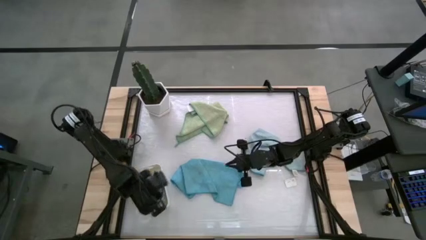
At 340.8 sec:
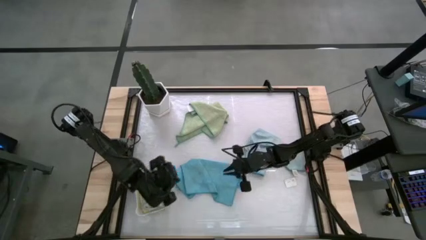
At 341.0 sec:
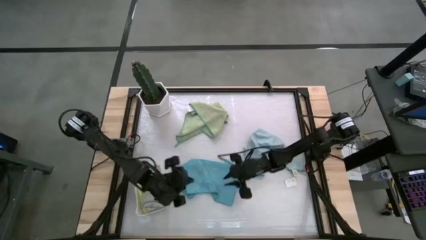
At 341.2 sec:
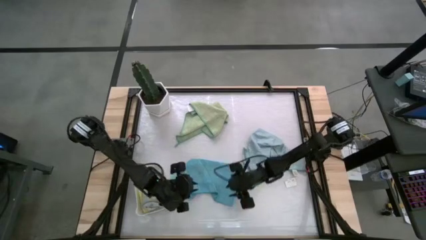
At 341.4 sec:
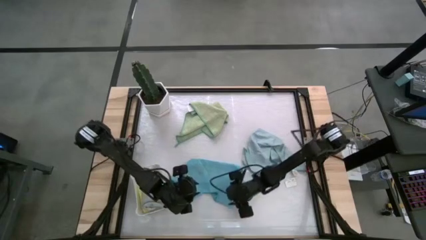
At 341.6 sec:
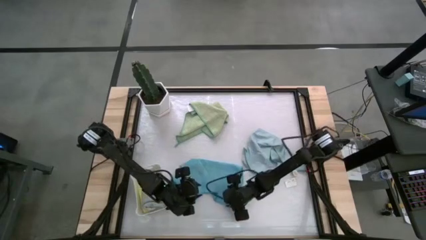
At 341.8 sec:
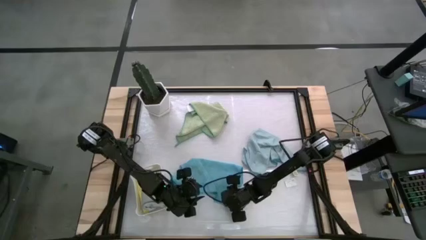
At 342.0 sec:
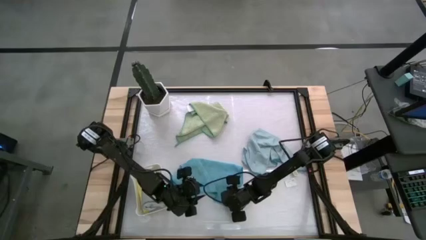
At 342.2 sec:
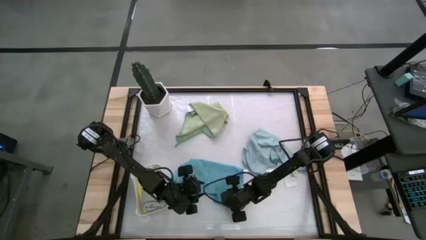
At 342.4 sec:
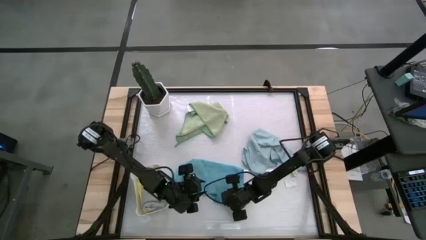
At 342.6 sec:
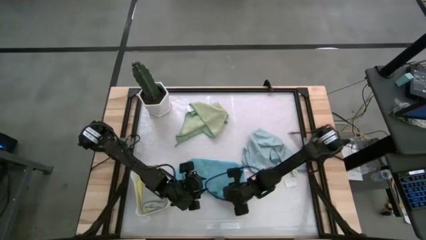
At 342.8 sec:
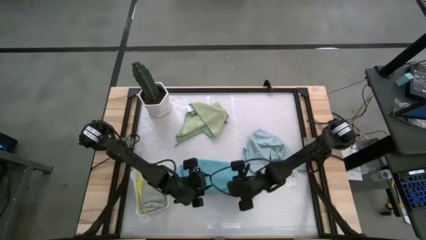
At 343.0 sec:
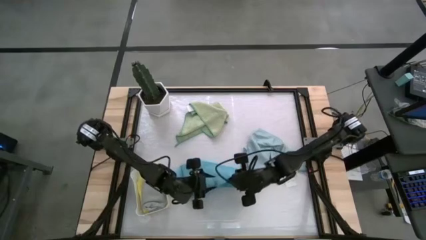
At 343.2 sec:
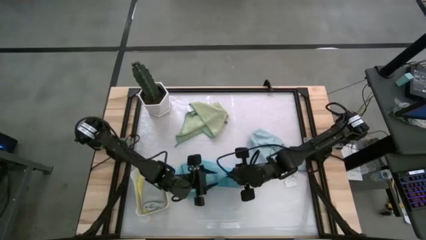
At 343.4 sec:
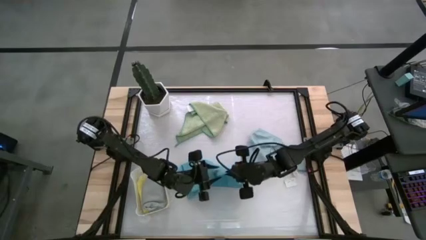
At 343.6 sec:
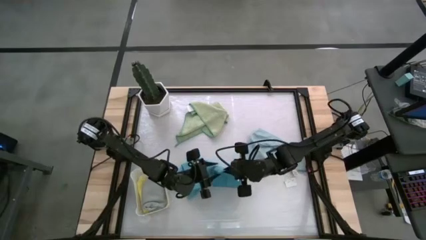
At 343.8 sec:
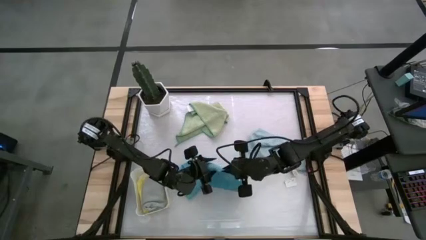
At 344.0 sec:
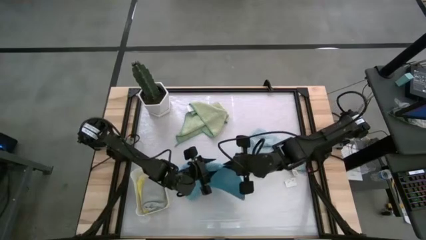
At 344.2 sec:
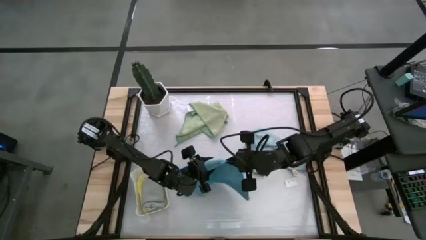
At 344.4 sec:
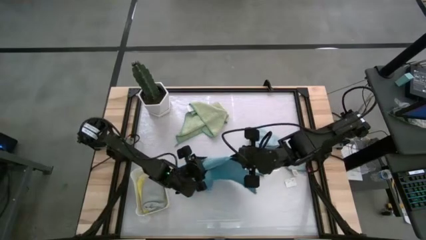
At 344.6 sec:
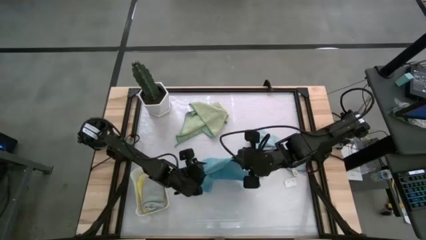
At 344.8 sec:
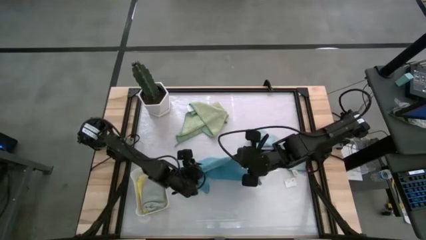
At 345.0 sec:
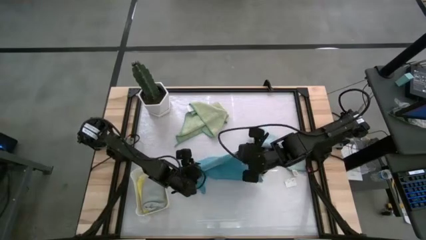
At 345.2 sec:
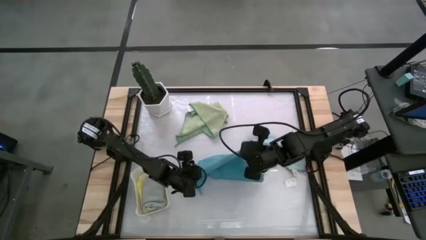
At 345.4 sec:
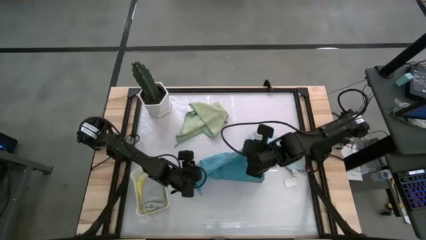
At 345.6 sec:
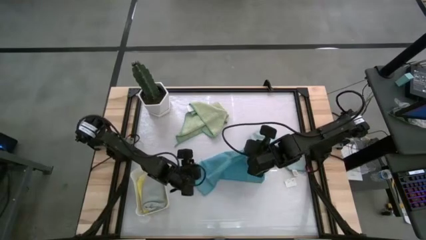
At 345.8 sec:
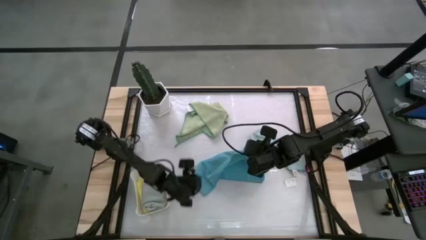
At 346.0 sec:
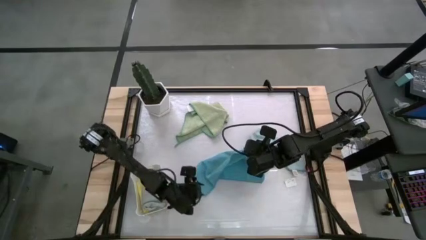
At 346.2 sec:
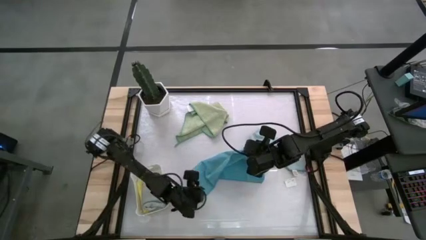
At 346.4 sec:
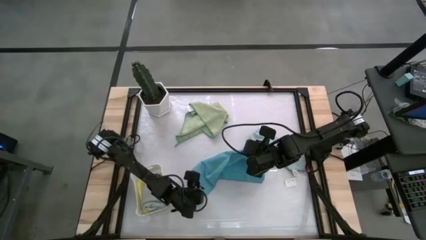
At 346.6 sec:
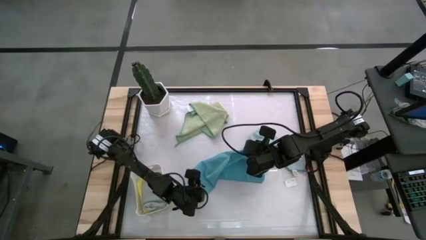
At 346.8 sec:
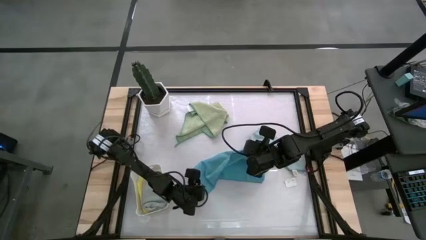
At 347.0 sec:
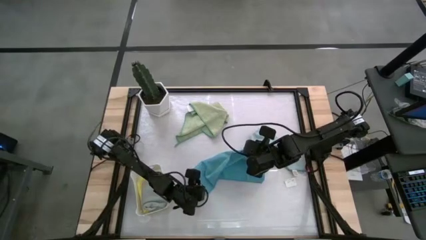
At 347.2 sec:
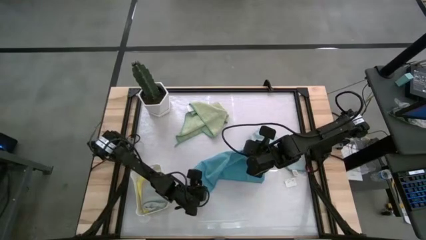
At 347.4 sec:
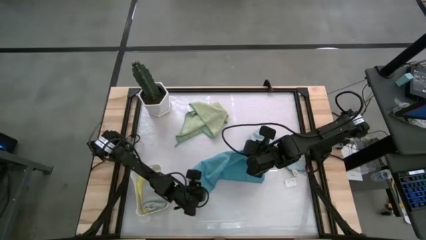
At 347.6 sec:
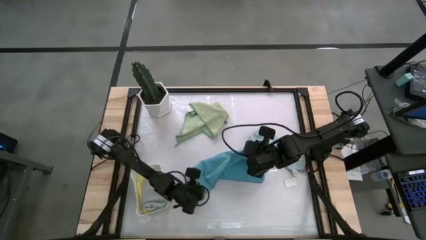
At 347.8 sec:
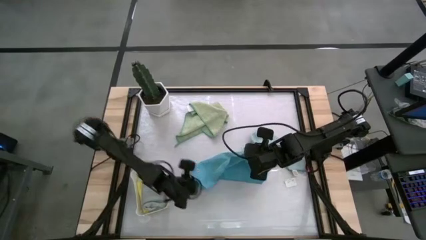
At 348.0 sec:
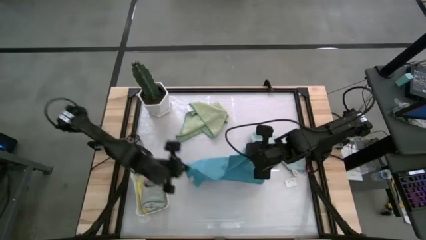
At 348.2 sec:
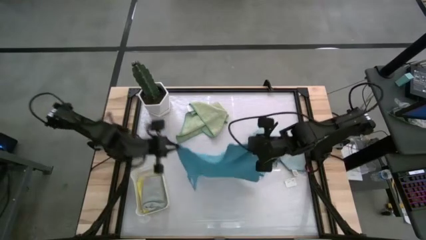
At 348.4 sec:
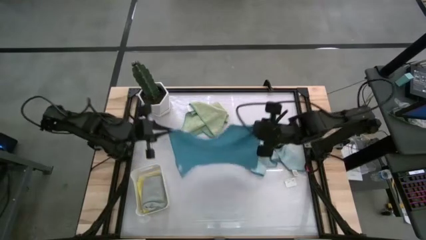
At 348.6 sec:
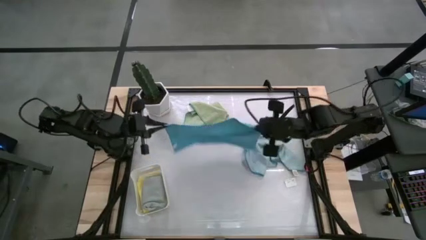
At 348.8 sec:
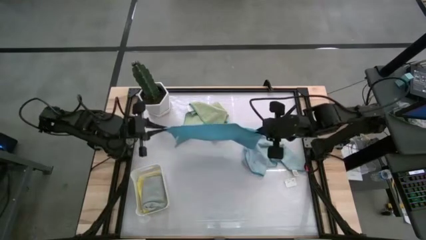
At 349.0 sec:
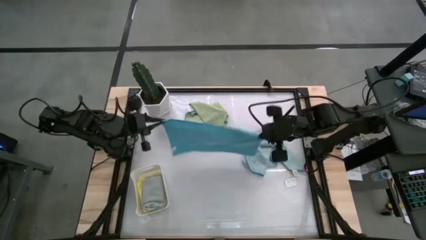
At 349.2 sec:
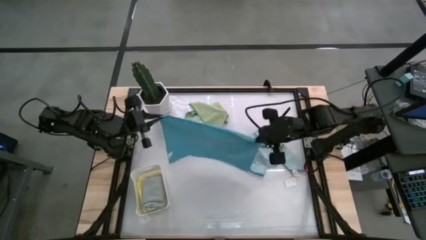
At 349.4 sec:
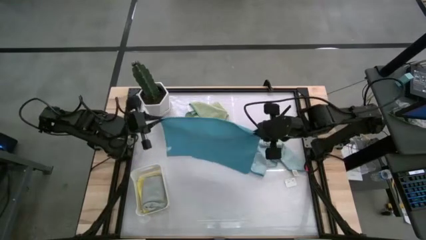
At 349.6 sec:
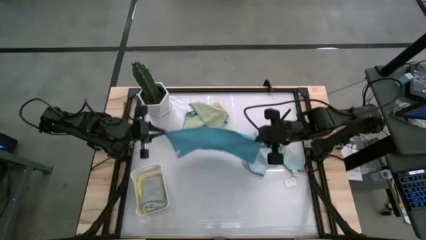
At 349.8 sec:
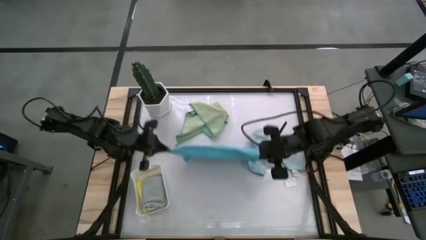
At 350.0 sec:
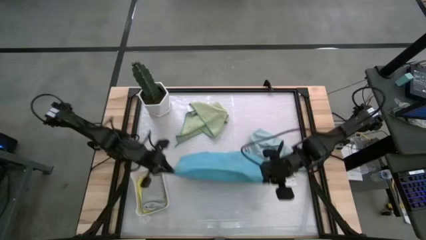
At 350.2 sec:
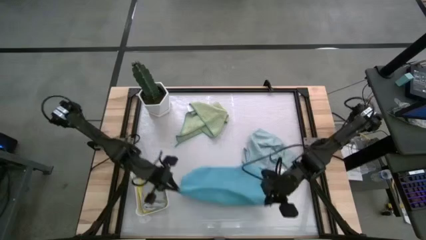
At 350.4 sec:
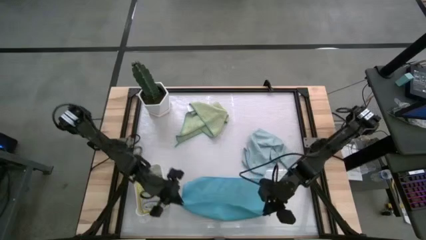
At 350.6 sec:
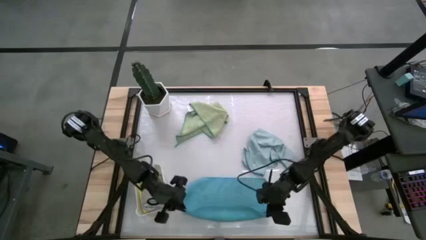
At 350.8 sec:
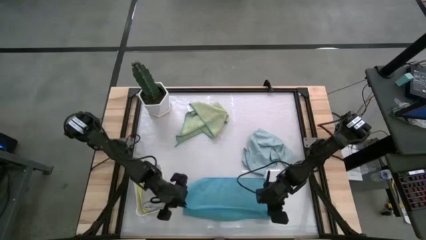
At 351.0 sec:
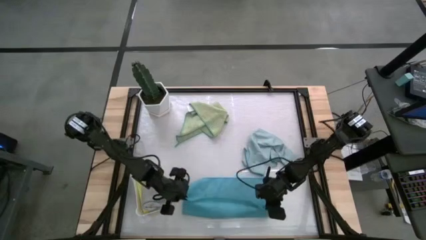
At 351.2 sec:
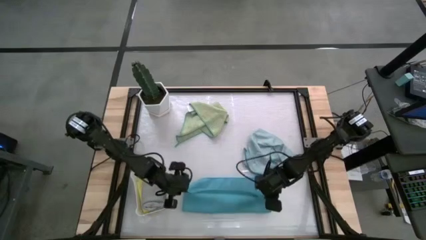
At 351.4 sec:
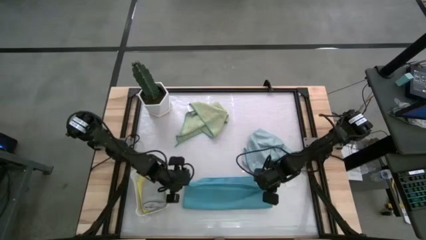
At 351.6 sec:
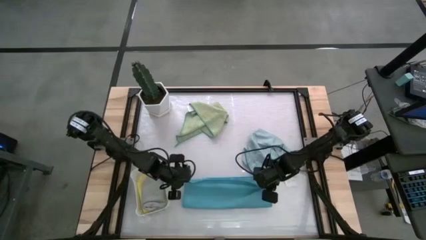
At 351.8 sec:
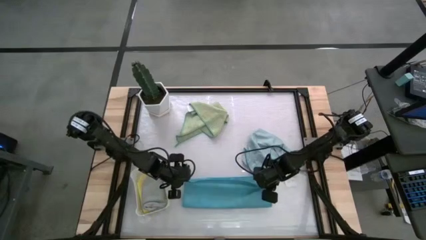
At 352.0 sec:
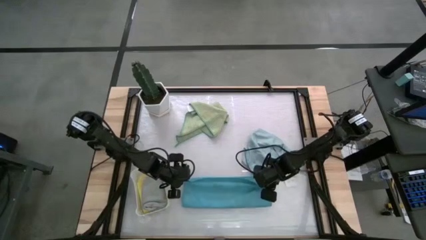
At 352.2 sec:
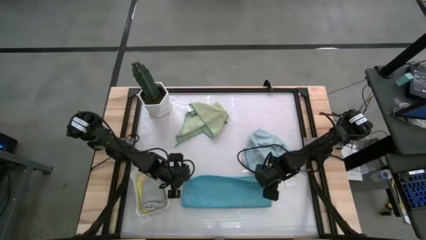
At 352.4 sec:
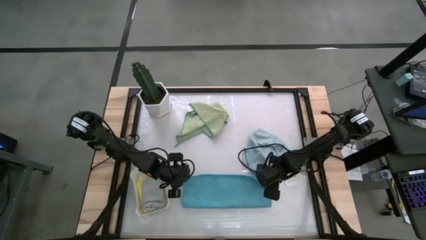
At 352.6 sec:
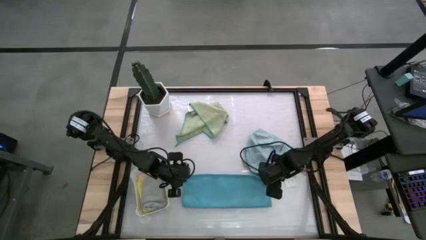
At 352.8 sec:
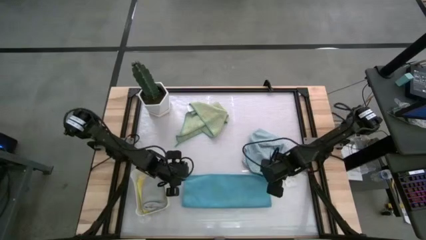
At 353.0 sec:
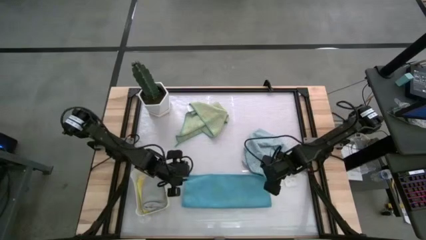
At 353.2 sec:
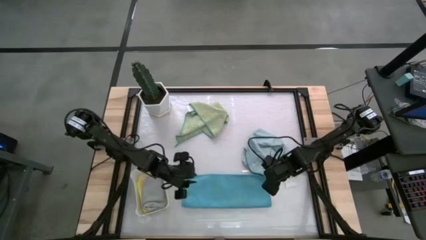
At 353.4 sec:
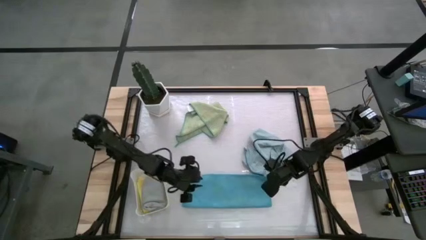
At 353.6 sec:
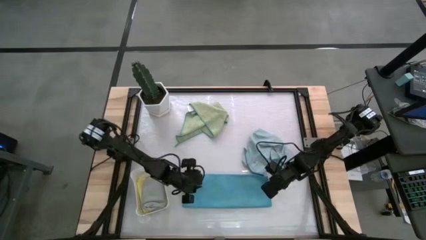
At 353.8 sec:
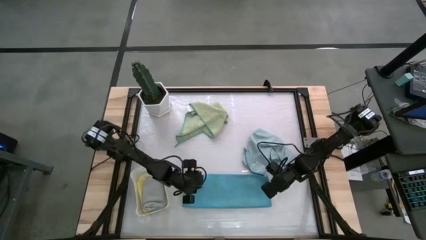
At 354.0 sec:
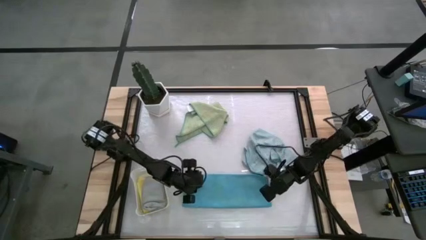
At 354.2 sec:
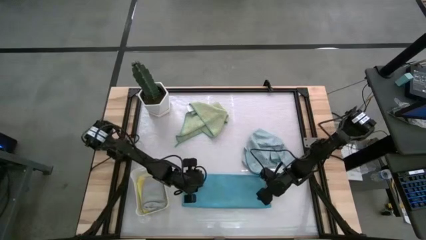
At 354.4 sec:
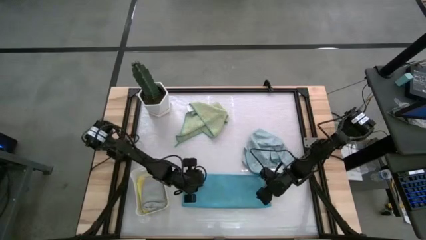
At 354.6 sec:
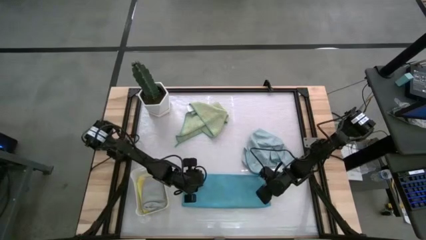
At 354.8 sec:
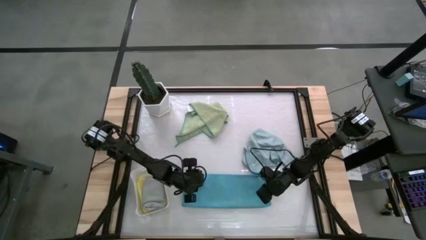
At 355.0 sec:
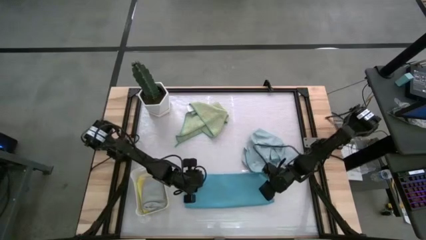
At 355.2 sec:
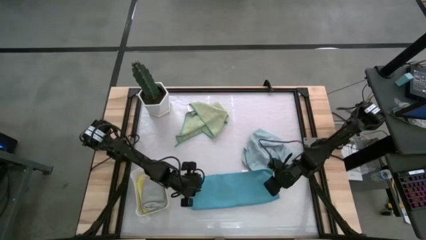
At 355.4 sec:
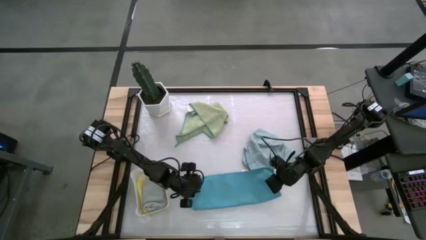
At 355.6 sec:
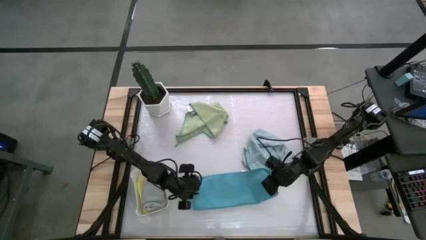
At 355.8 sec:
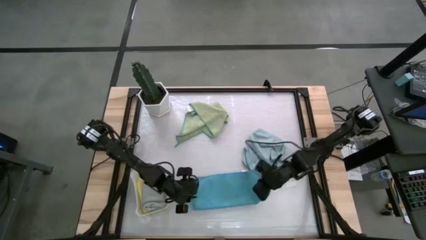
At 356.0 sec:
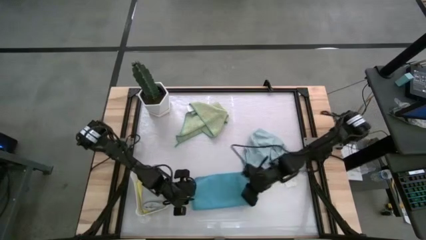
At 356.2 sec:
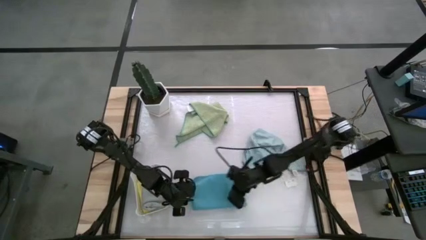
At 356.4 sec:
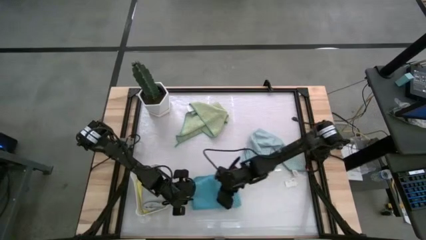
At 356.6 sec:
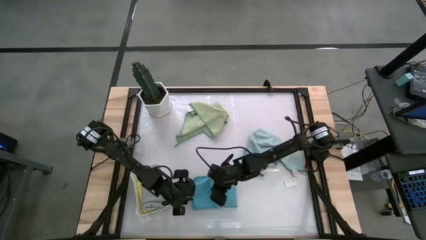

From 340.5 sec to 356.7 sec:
Task: Fold microfiber towels
Fold the blue microfiber towel
